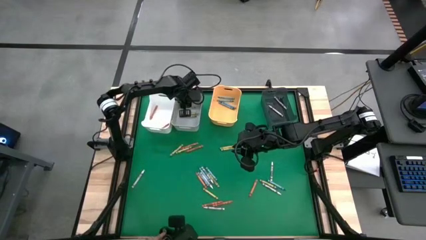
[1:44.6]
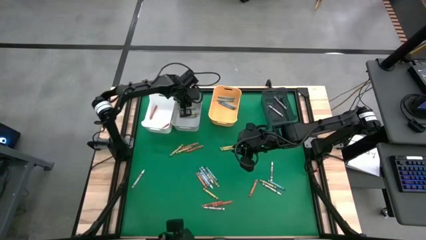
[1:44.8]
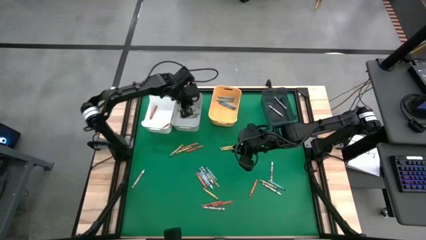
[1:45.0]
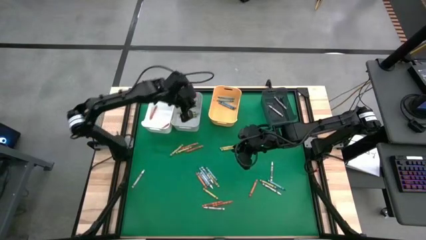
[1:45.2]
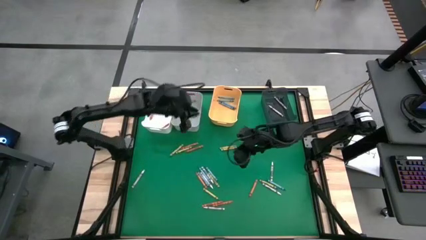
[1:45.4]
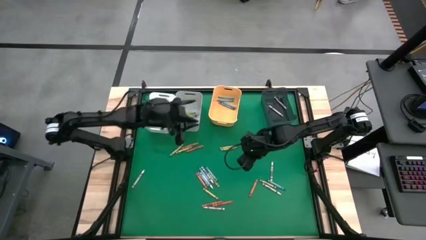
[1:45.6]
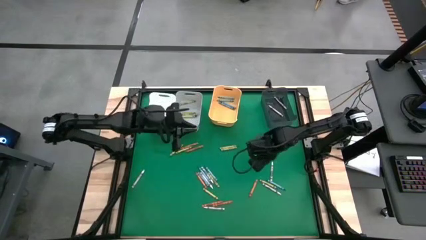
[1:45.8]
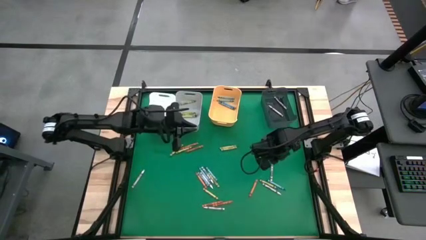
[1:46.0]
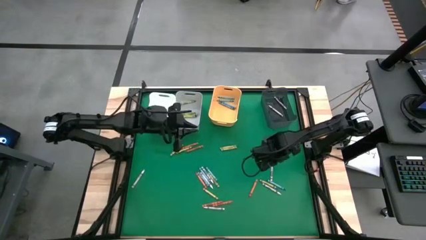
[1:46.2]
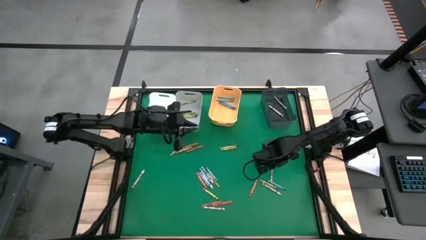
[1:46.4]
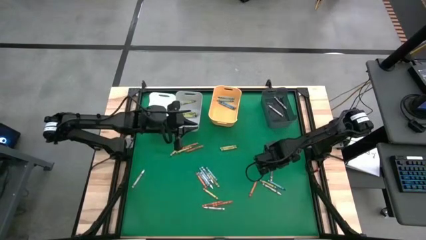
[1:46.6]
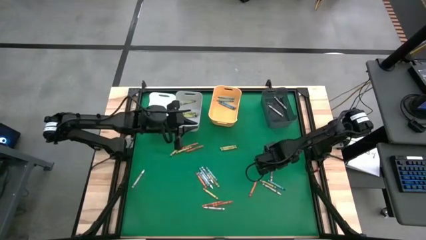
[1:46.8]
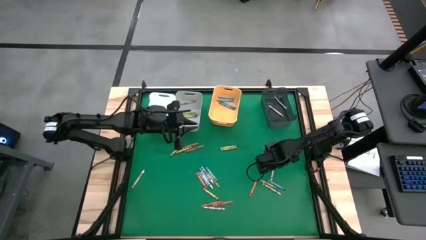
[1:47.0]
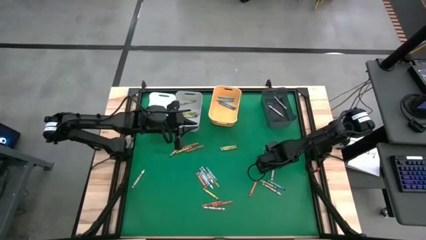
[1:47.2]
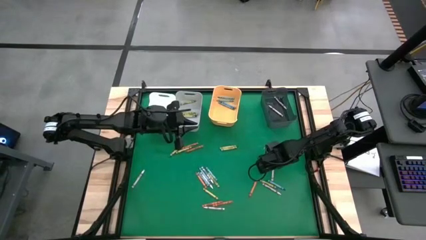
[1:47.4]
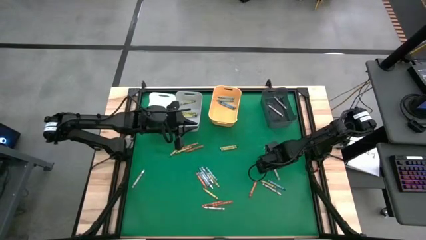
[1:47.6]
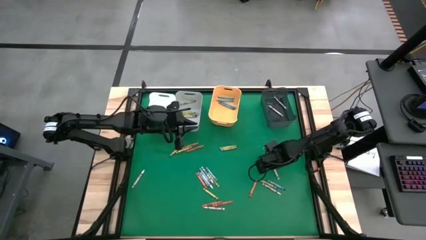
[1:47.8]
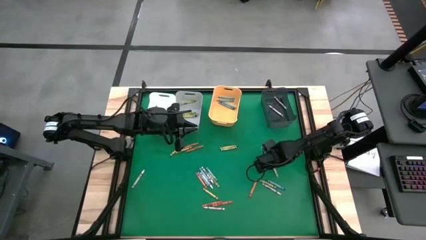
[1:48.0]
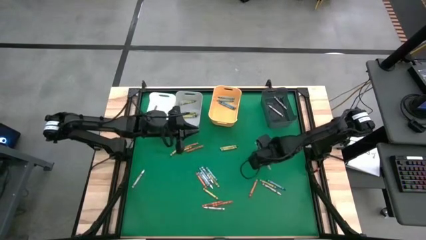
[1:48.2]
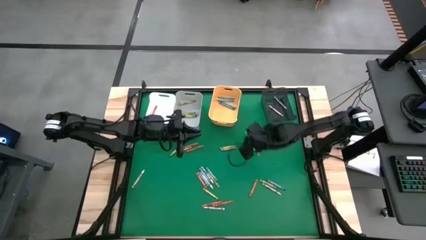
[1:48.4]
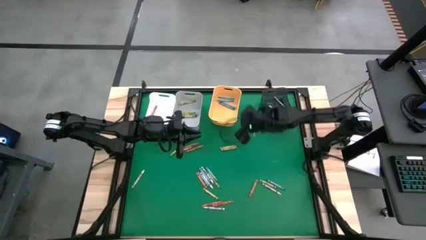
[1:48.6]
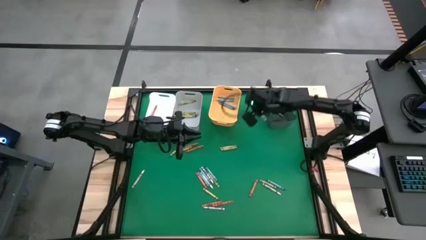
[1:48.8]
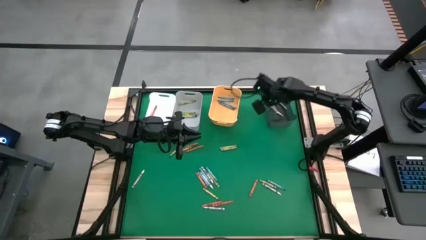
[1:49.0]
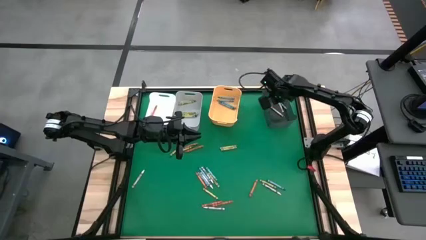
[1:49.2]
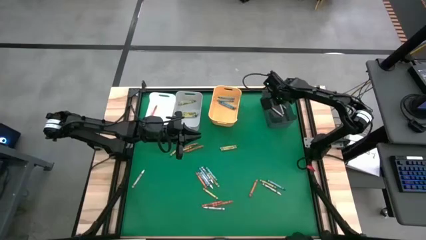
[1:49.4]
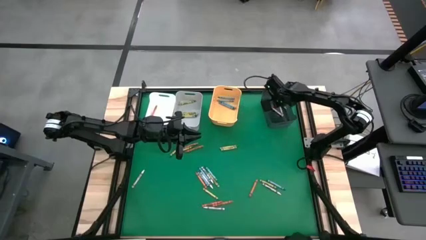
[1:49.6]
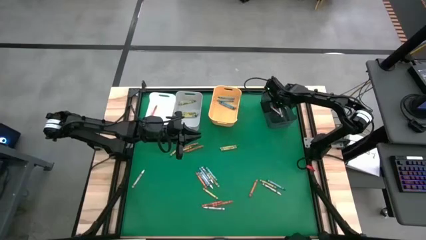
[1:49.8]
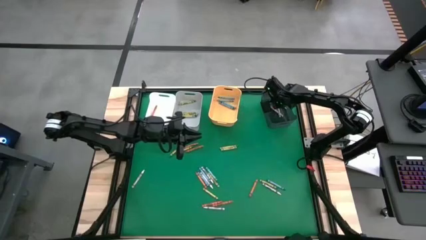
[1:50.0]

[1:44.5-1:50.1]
Task: Sort crayons
Put the white crayon into the black bin

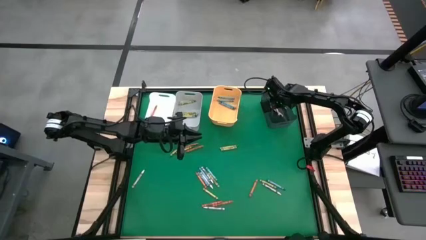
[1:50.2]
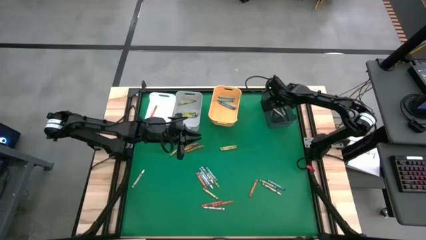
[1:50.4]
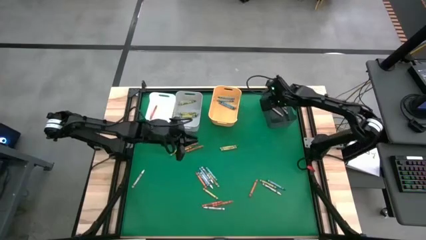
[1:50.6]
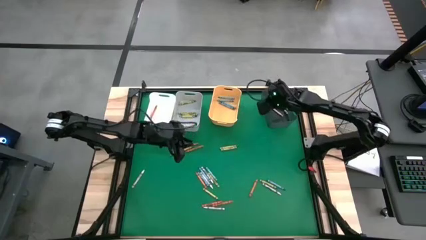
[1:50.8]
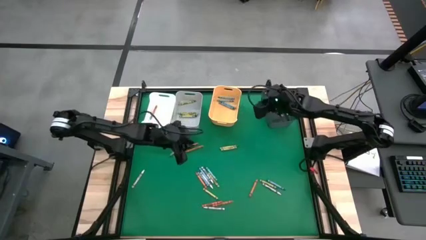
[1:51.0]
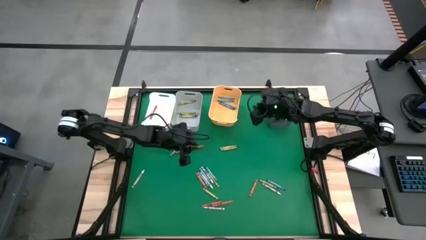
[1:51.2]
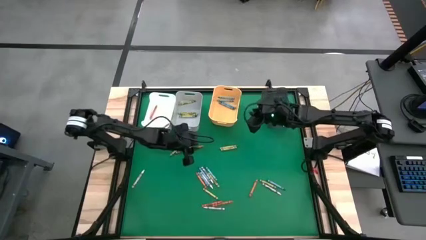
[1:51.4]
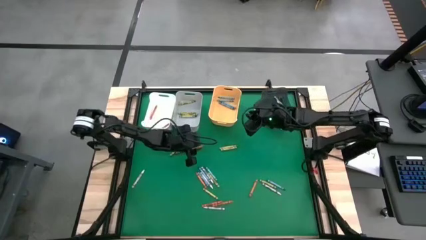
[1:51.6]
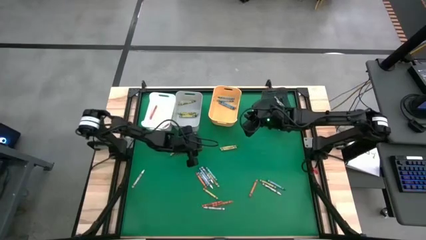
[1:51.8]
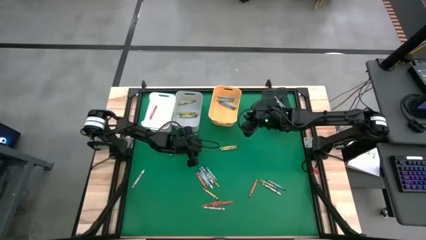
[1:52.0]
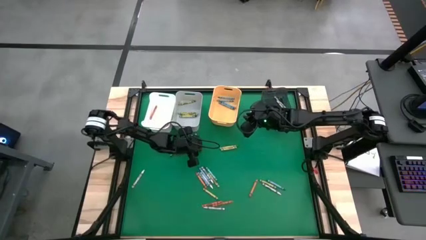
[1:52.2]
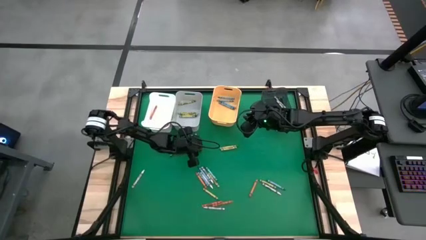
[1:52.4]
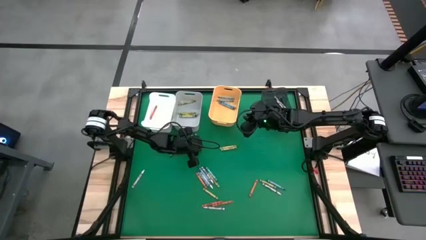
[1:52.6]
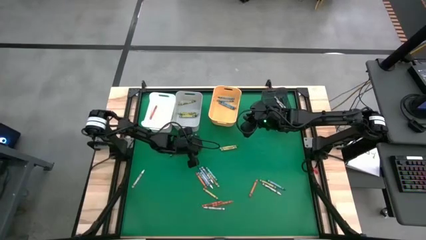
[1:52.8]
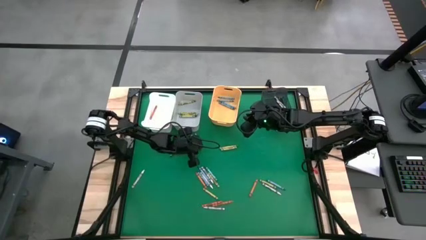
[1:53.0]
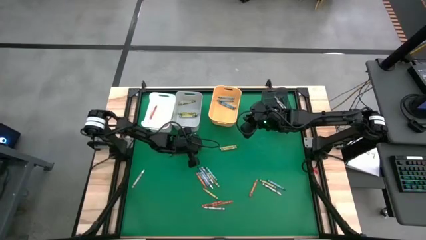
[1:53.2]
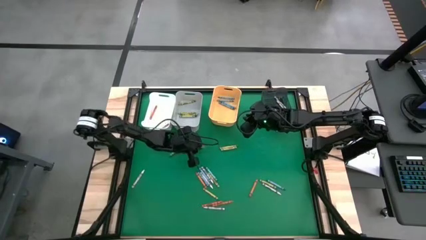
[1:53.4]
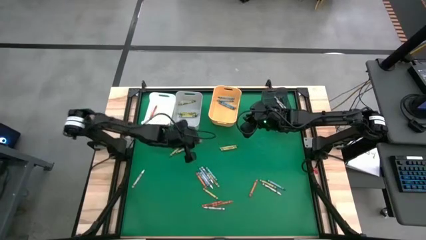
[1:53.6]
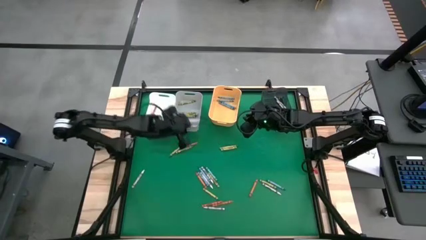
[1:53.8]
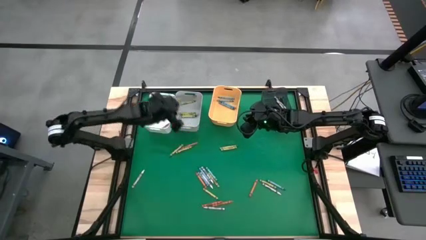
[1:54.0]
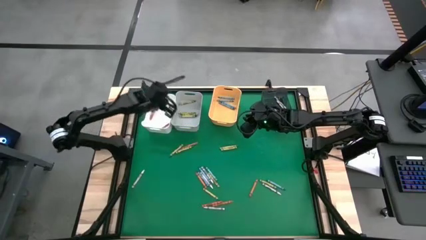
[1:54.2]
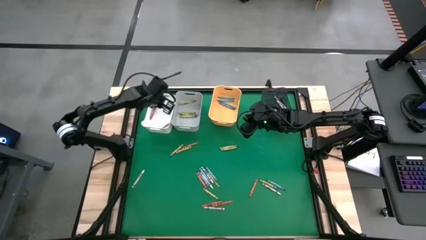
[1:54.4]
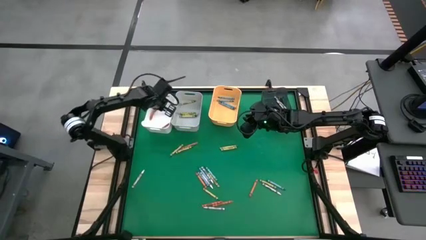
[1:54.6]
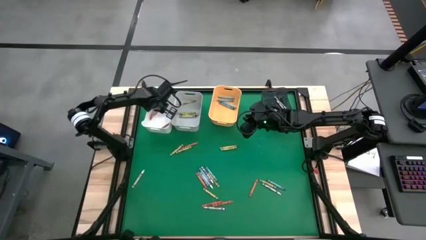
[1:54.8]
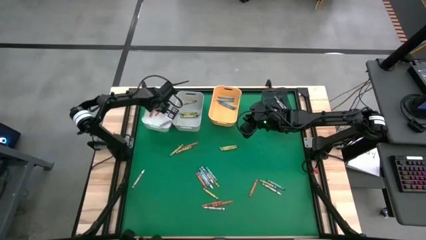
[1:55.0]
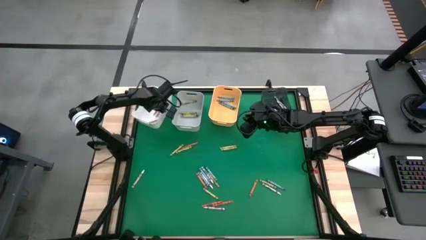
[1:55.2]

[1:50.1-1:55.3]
Put the orange crayon into the white bin

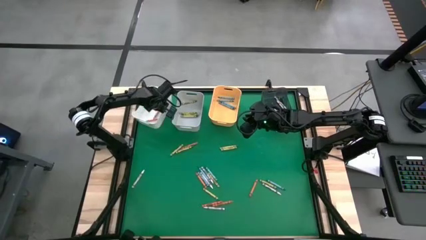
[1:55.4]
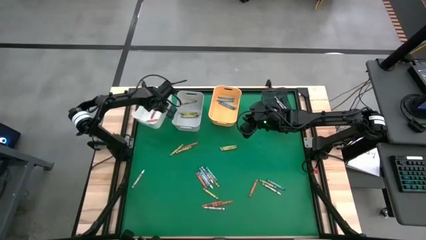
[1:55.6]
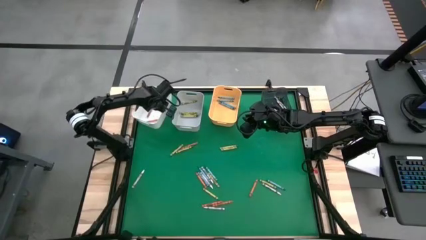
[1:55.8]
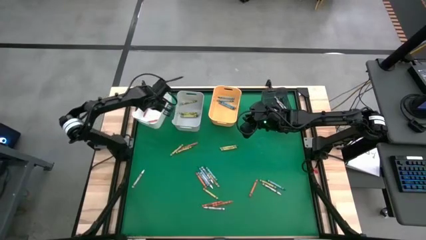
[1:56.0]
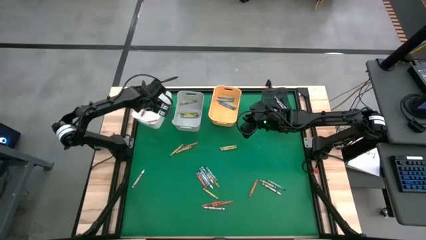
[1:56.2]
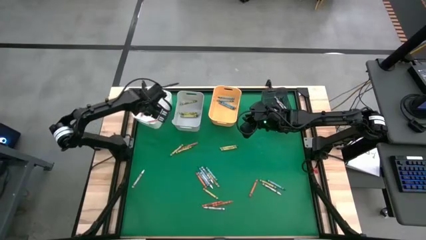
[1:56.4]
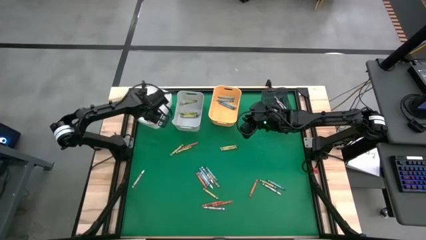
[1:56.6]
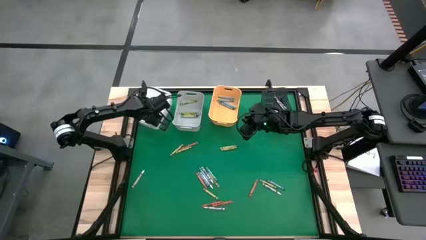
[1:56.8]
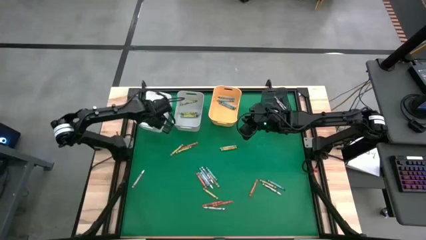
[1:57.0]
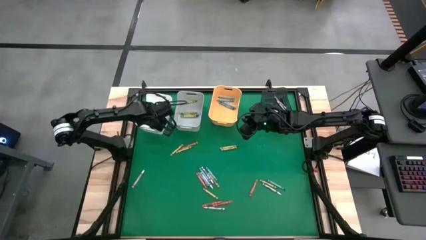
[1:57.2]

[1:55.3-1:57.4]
Adjust the white bin

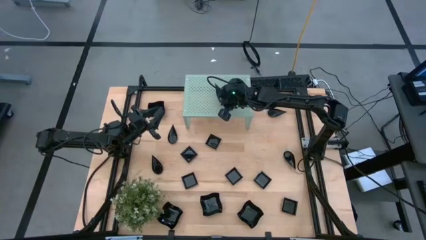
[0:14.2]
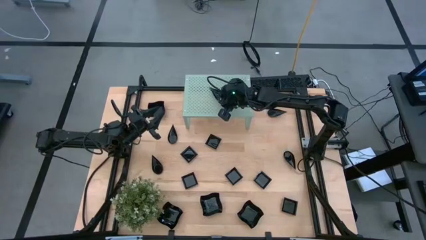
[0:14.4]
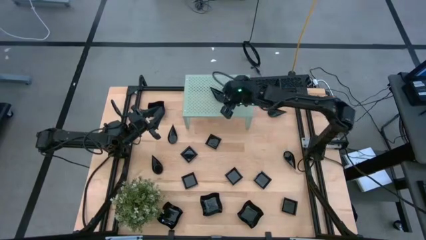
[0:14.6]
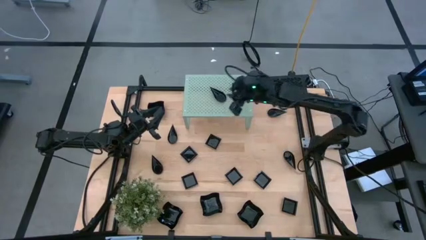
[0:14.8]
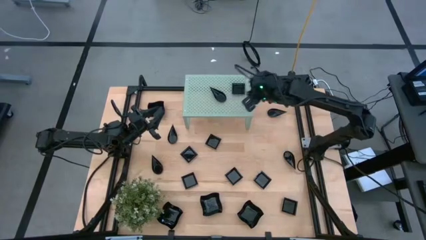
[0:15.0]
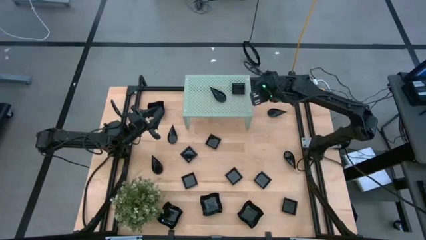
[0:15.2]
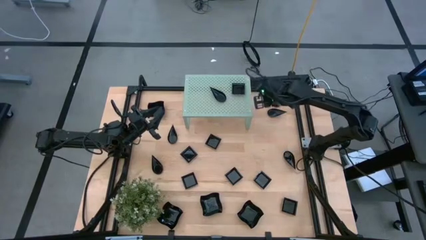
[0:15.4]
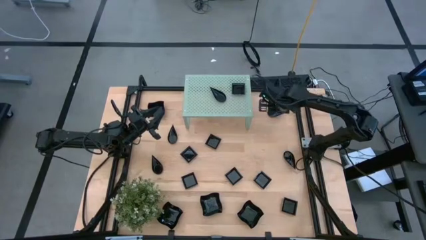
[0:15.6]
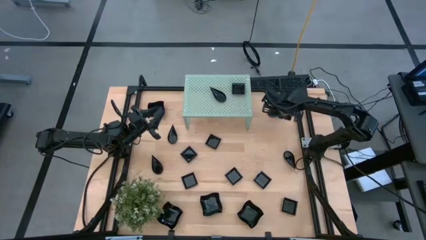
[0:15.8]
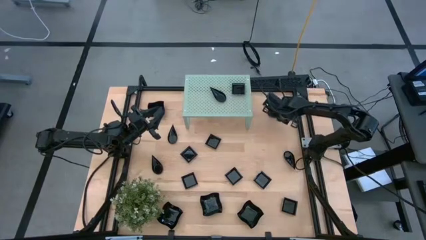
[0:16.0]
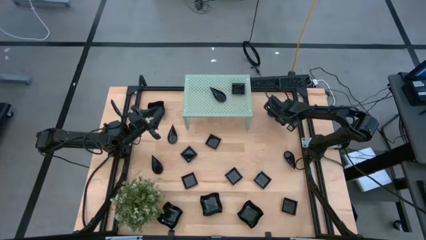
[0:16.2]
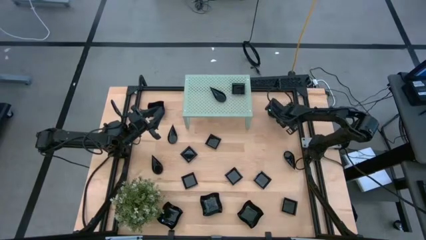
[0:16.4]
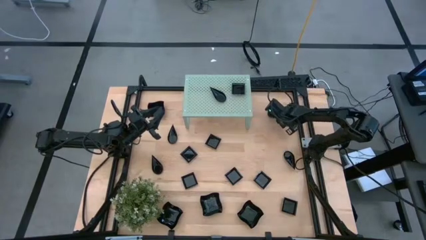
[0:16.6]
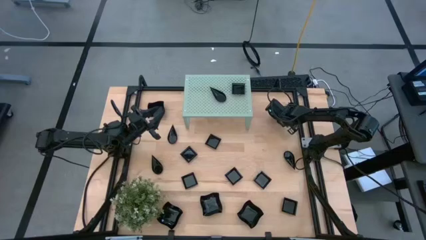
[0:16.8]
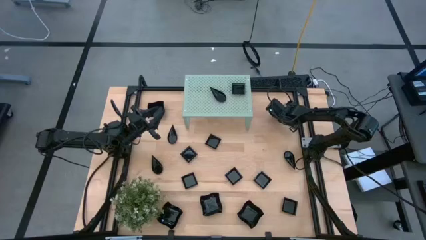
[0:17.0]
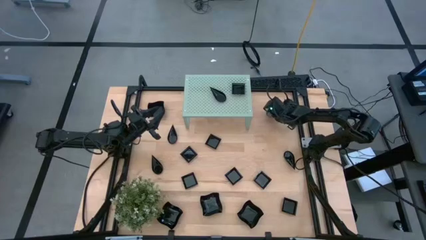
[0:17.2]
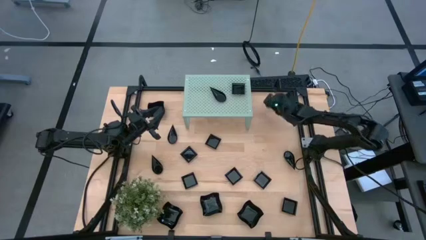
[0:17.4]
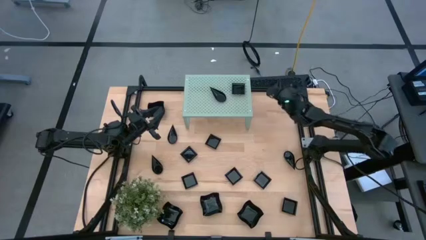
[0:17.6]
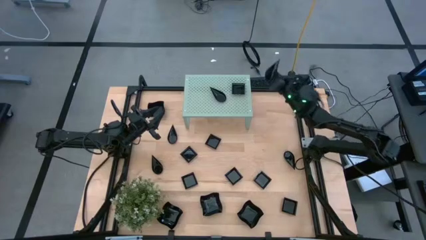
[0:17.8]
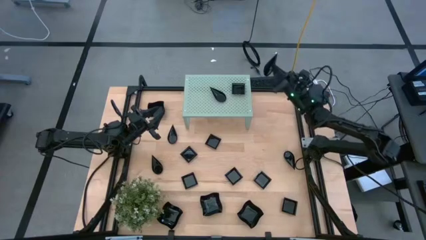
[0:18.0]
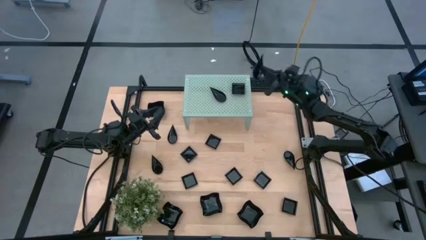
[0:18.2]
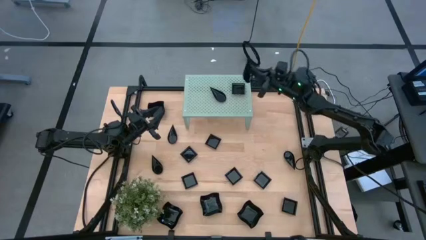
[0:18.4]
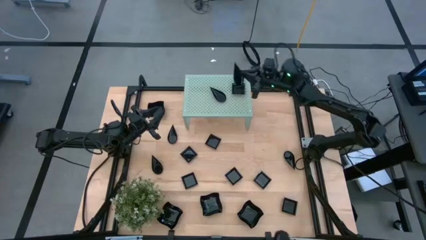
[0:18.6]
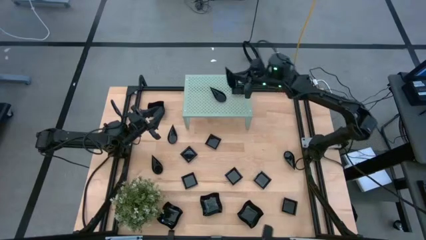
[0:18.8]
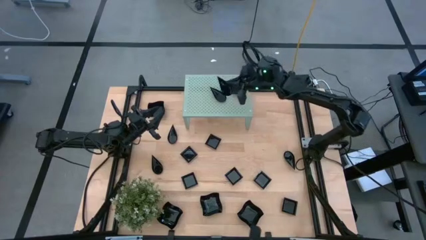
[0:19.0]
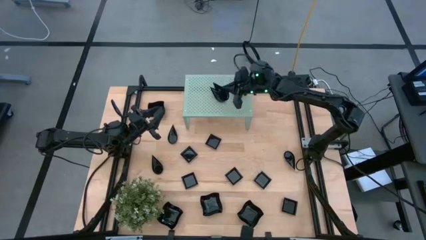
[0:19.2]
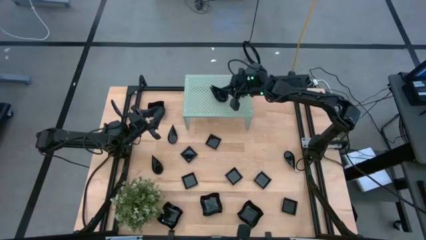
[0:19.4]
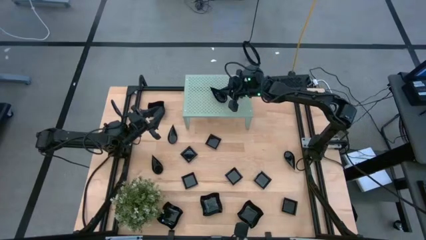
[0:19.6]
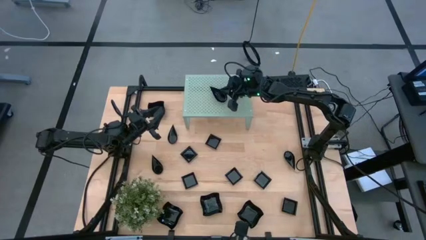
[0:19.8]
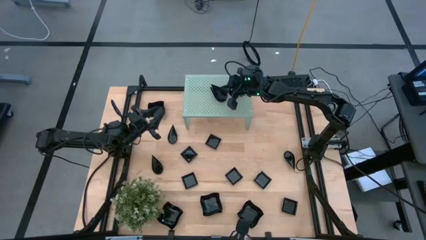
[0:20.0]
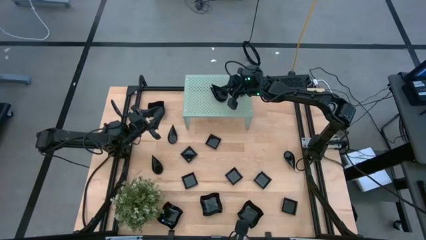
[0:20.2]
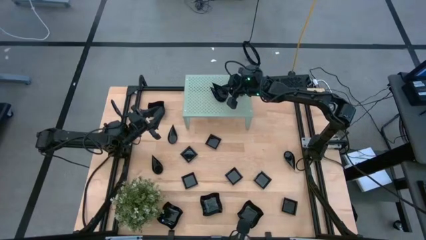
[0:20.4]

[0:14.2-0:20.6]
Task: Pick & Place Mini shaped plates
Stack the black drop-shaped plate on the shelf
